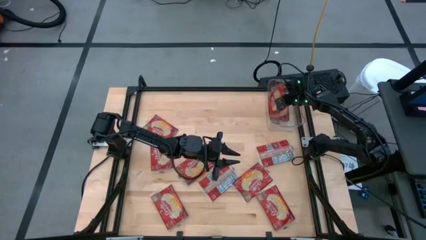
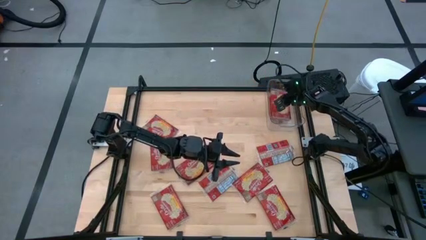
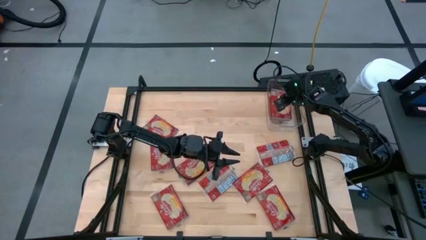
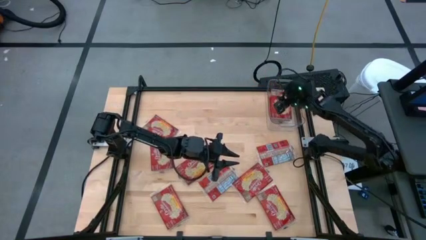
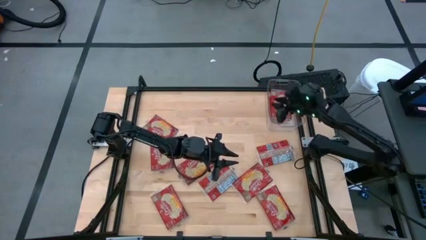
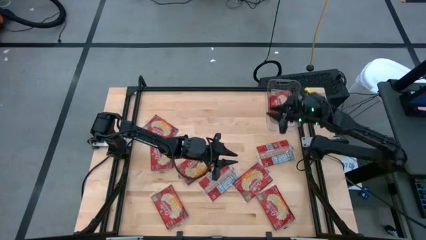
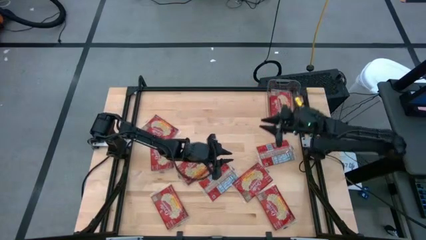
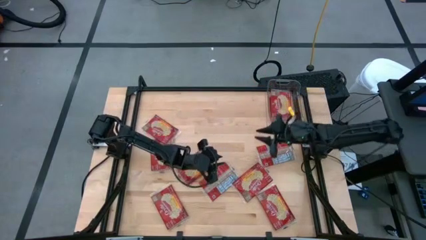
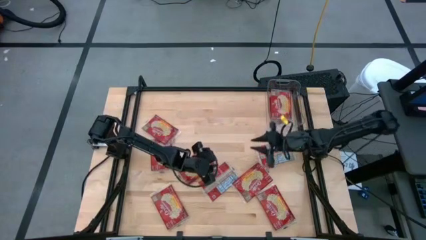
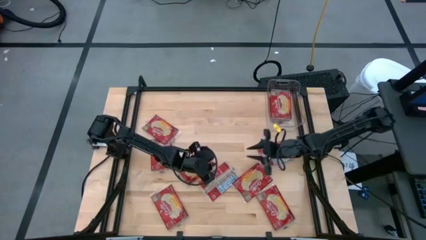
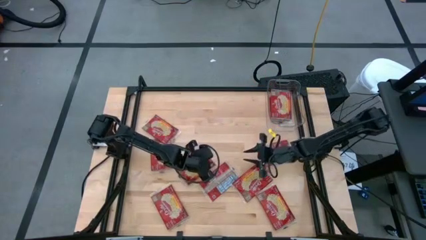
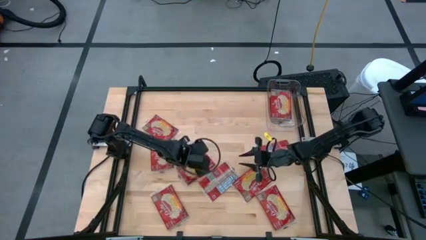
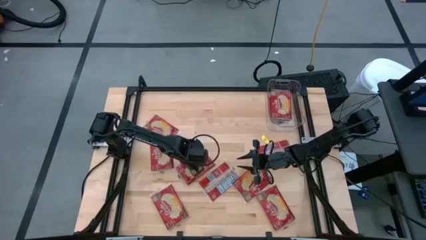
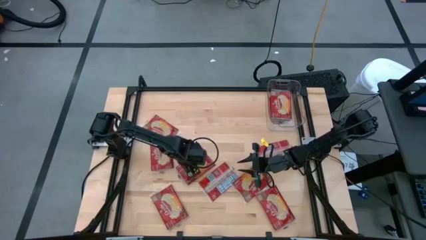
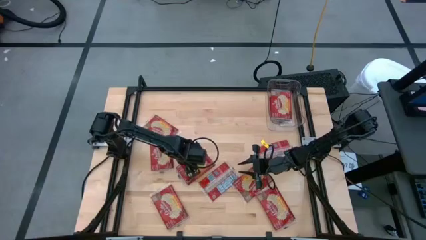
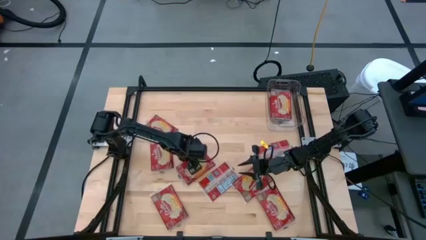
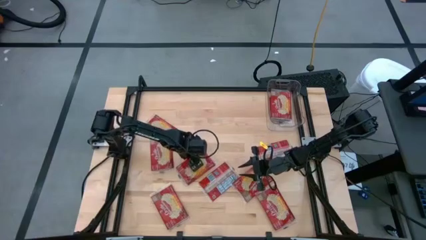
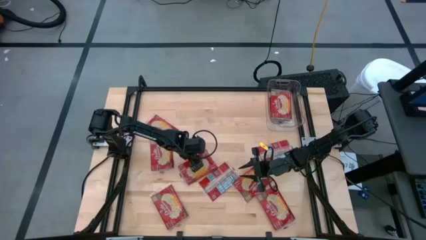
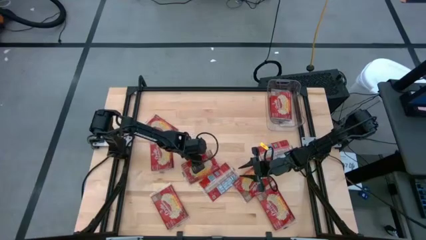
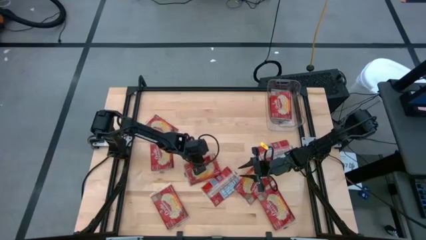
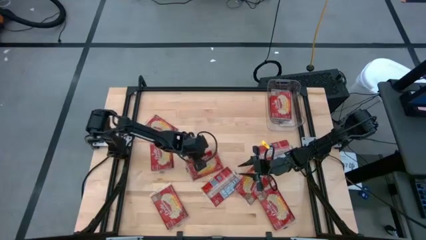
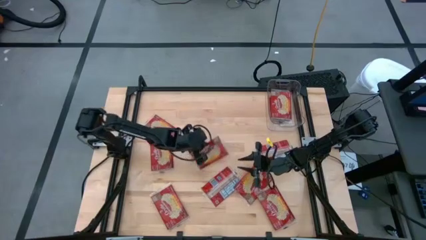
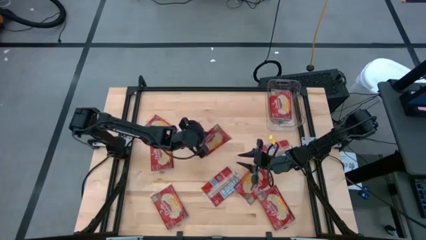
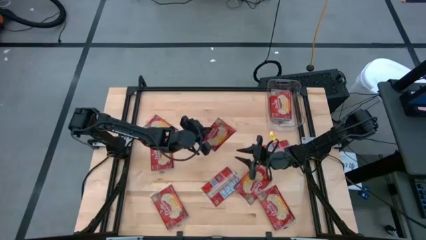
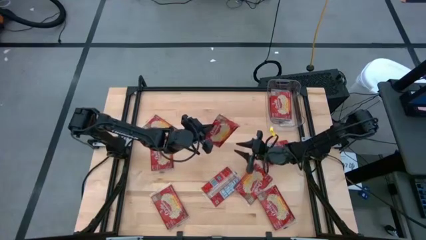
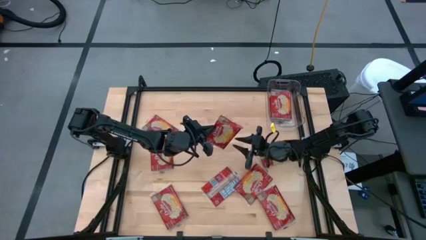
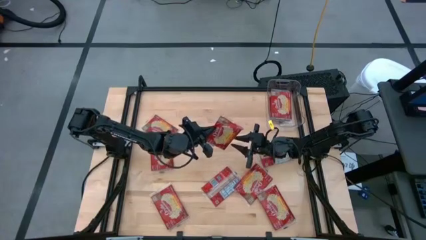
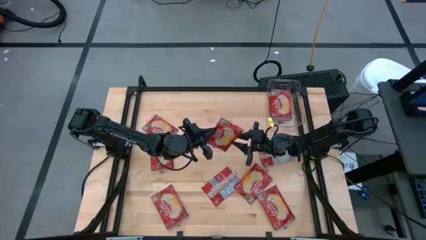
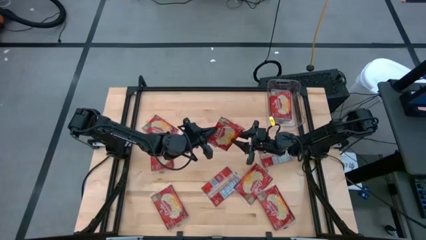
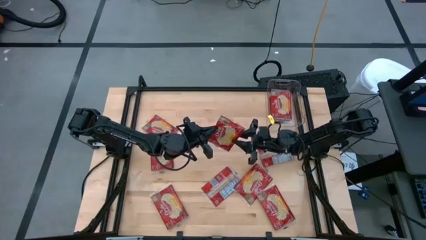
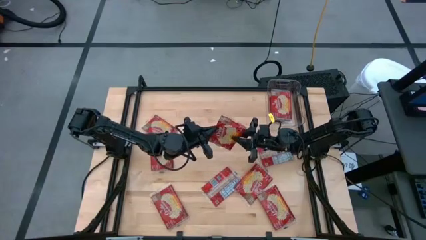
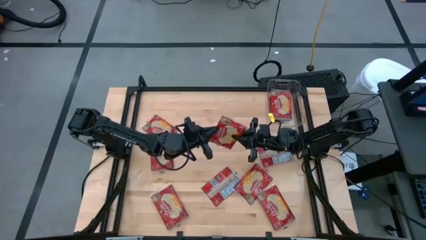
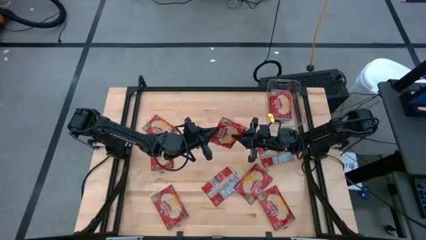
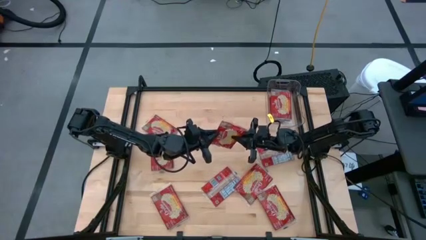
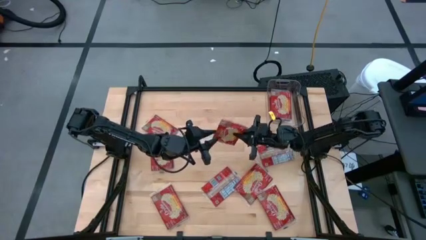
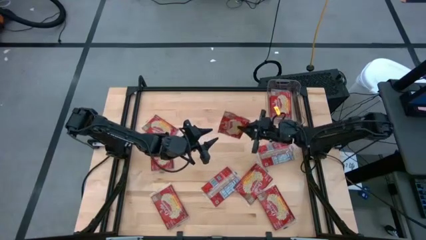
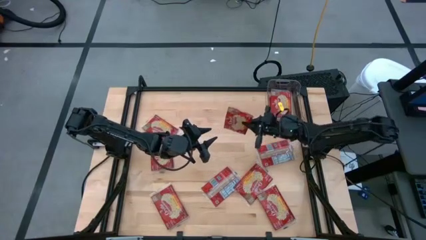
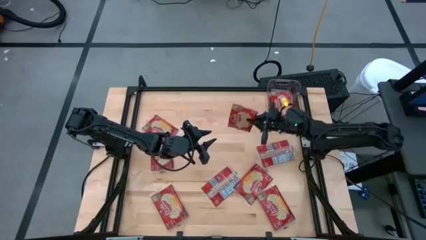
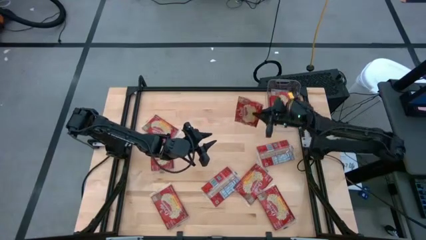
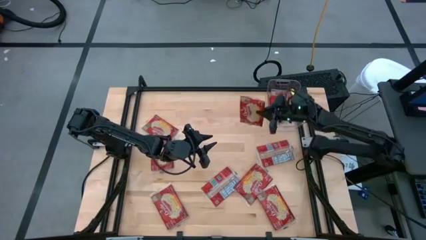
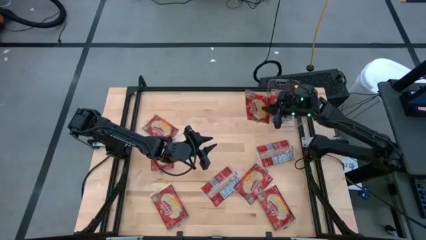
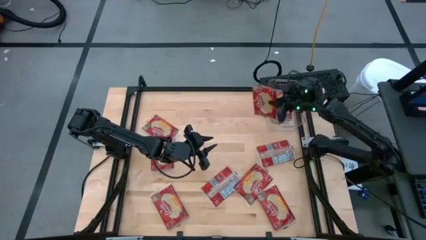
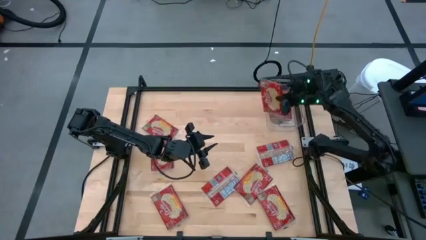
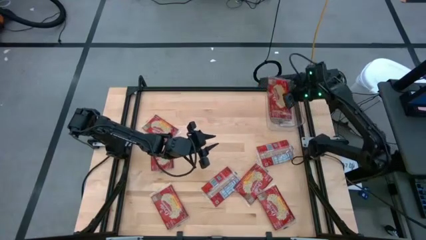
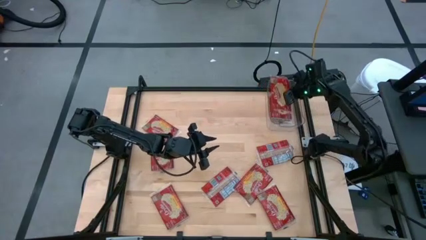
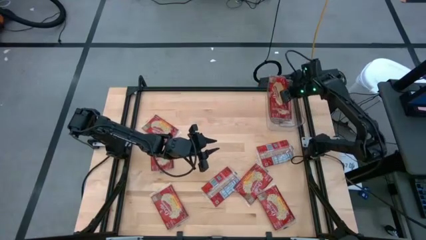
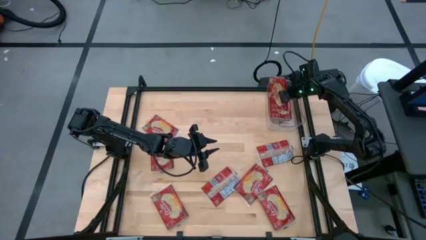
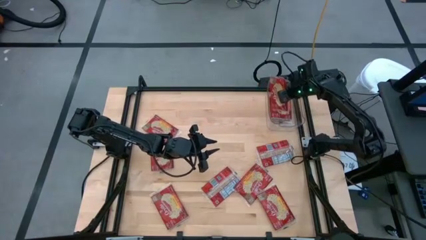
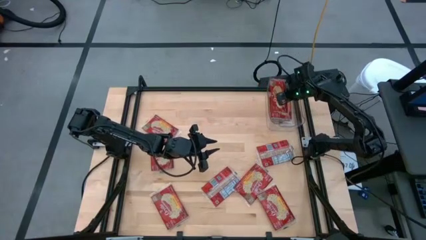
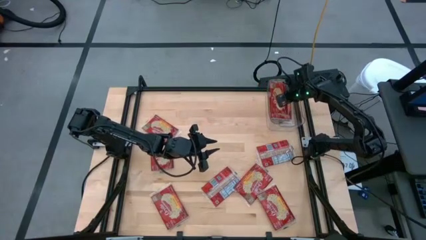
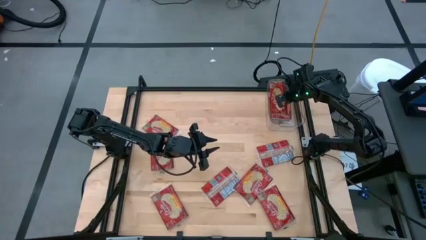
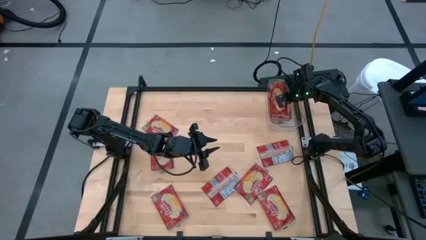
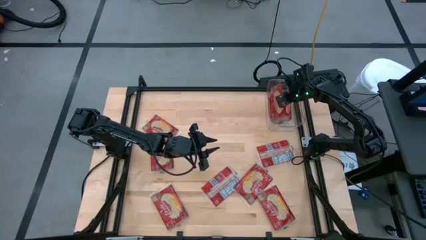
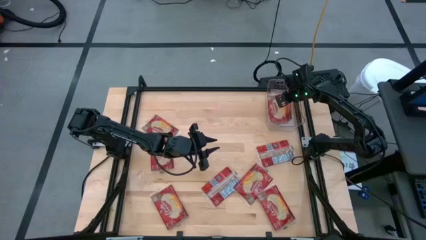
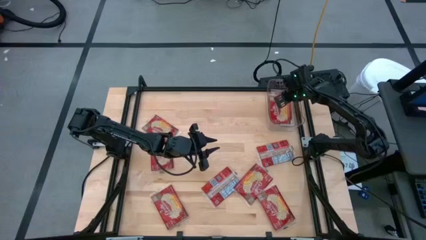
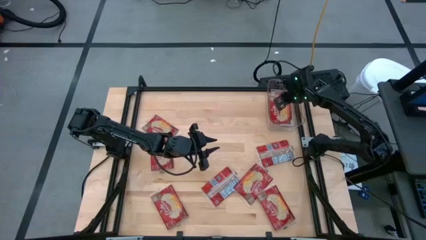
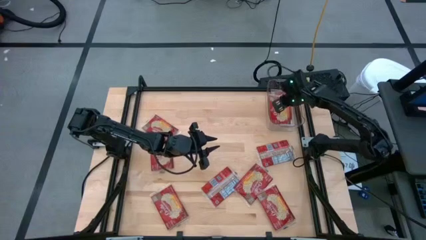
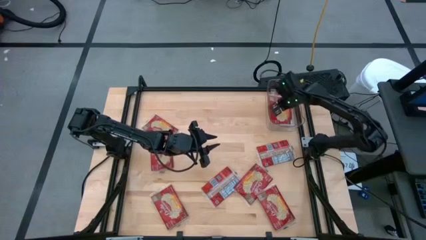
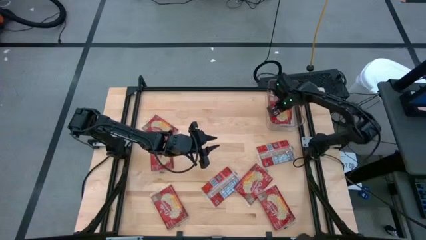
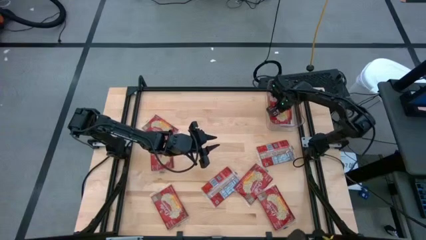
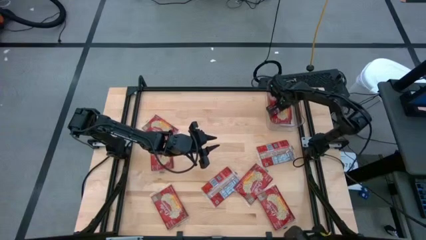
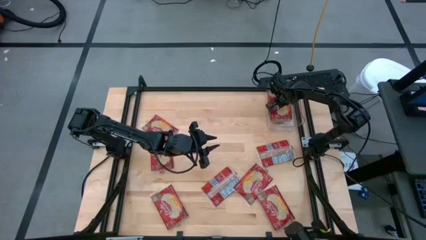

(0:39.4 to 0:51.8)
Task: Sort popcorn bags into baskets
Put the red popcorn bag into the transparent bin

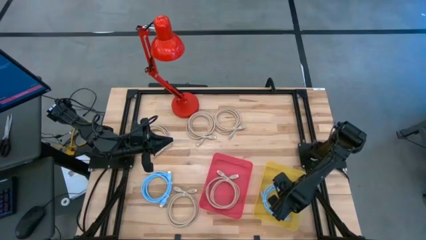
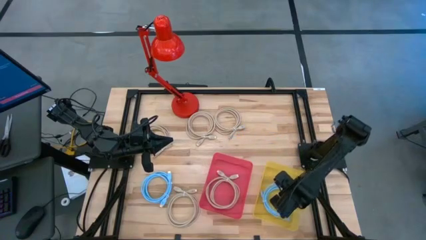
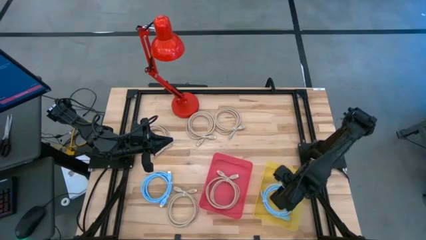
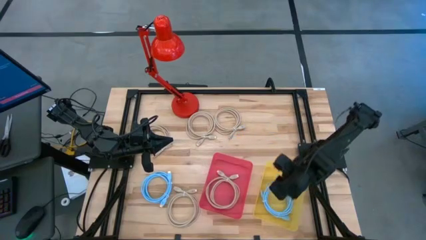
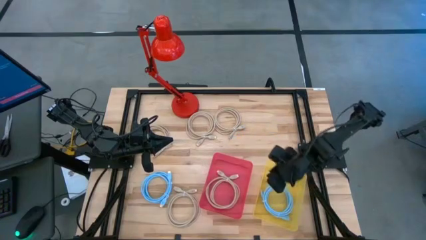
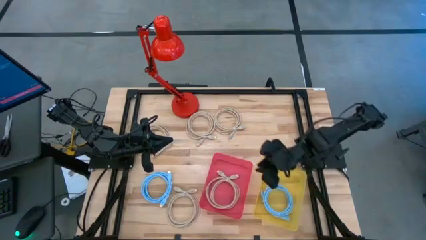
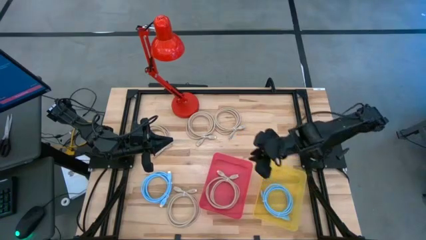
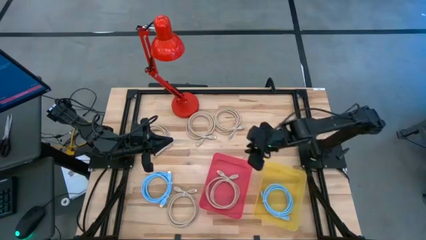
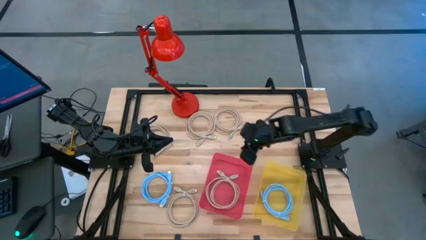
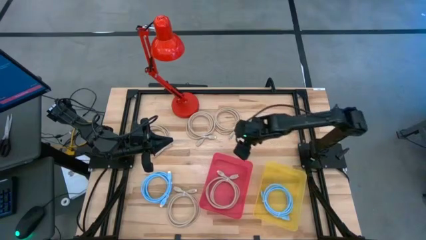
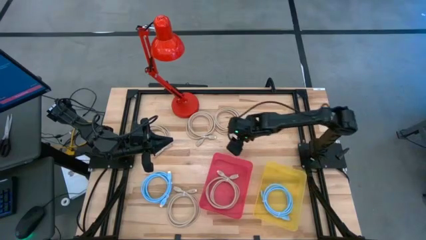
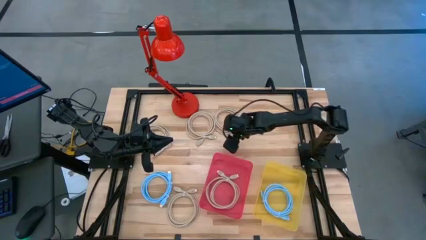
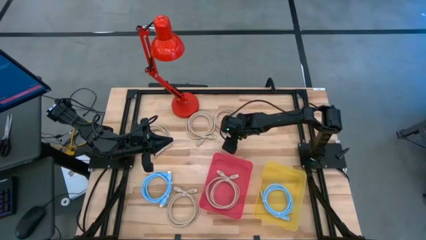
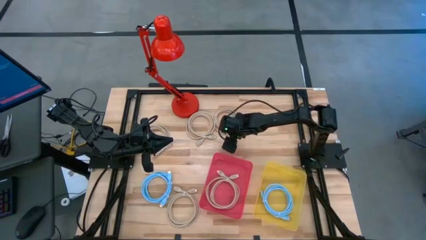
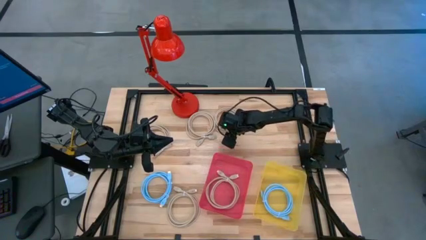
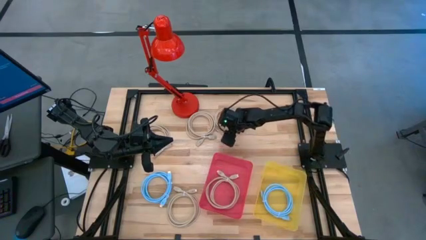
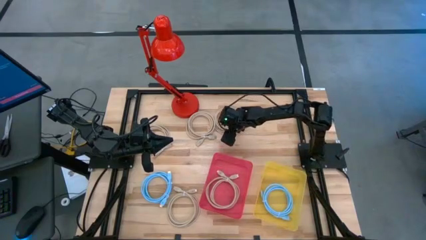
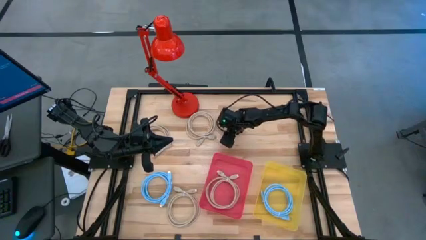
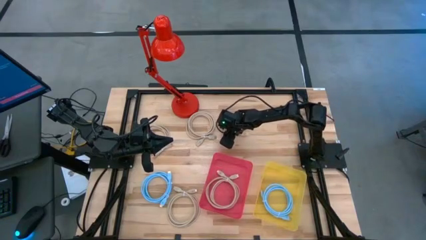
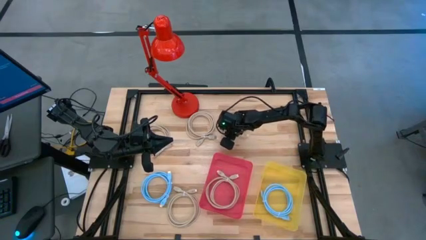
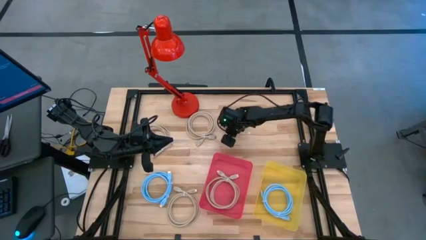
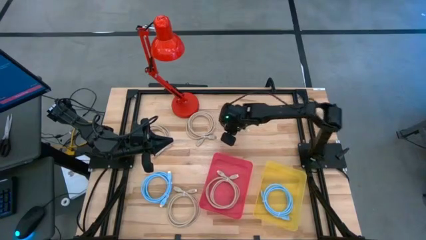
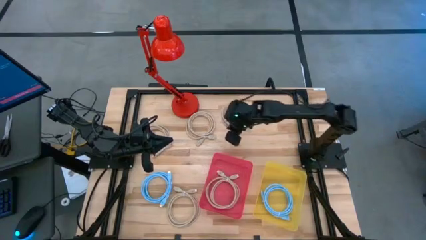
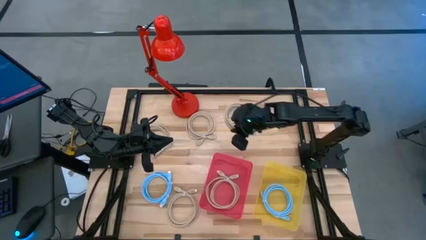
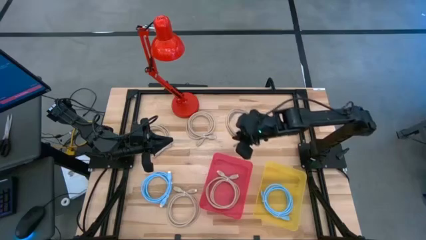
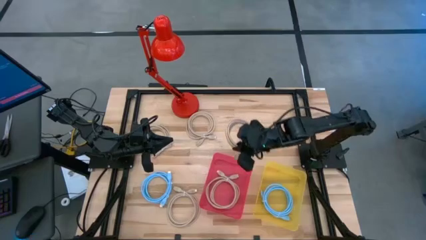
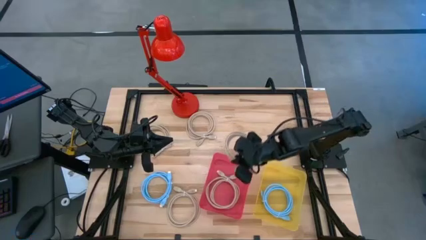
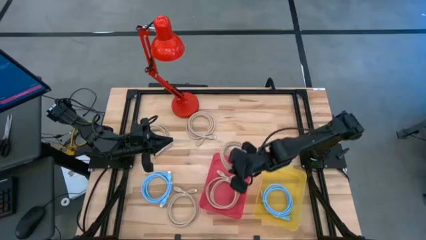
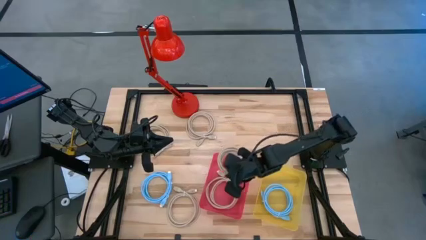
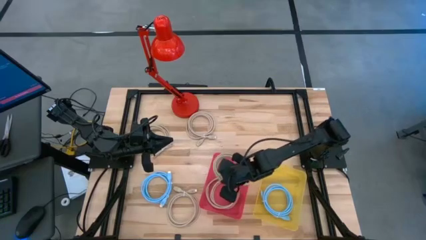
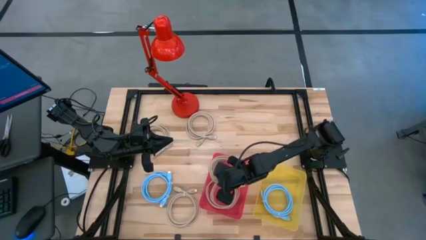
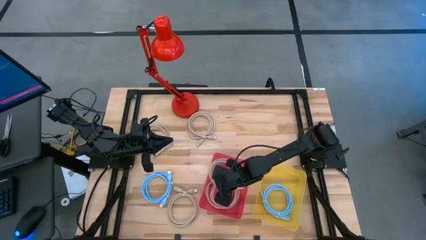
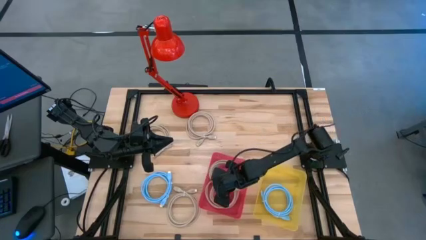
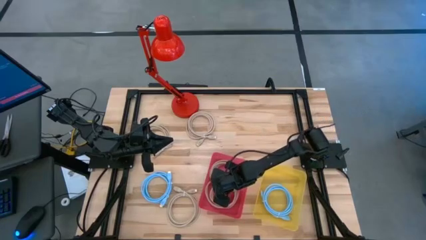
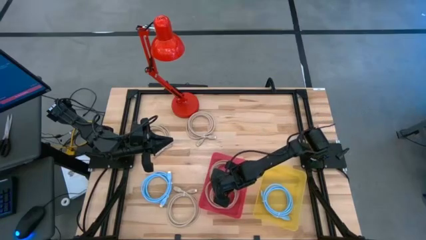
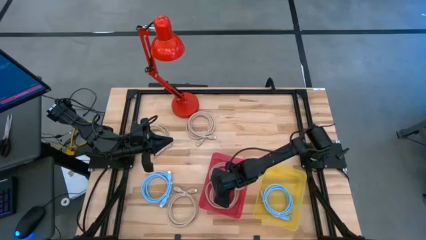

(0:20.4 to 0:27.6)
Task: Sort HDMI cables
Put the brown HDMI cable into the pink bin
